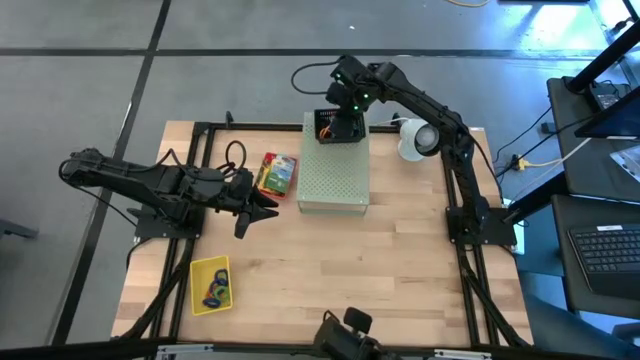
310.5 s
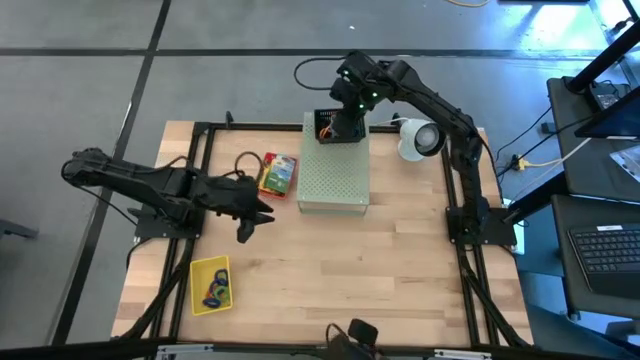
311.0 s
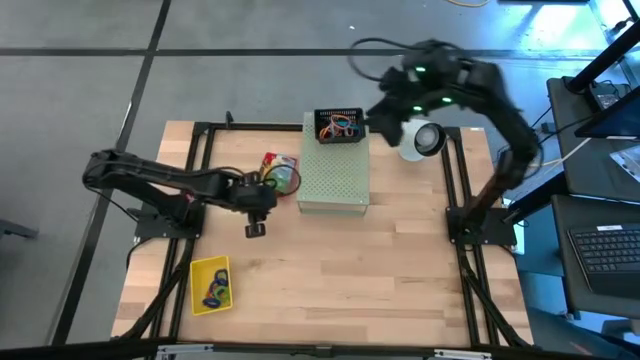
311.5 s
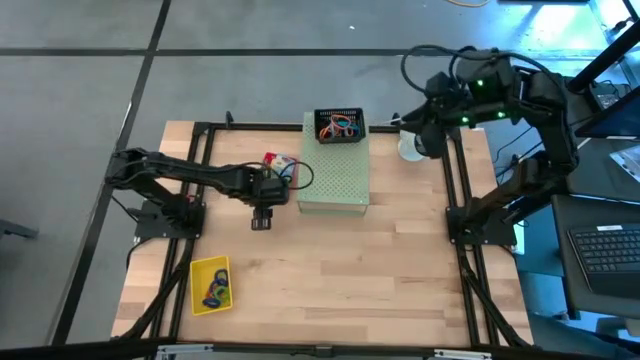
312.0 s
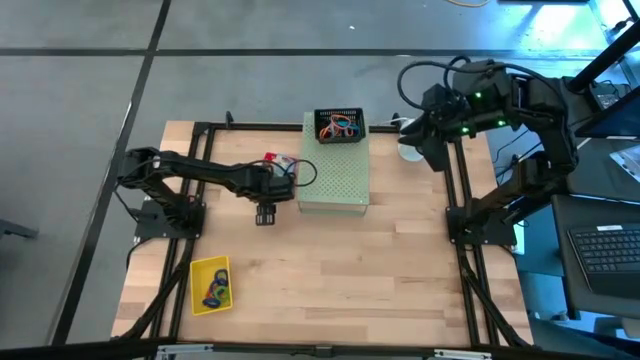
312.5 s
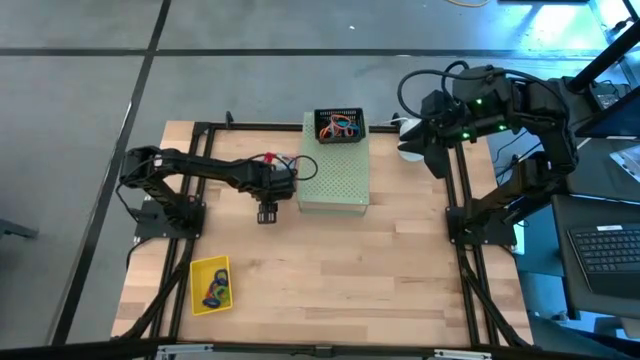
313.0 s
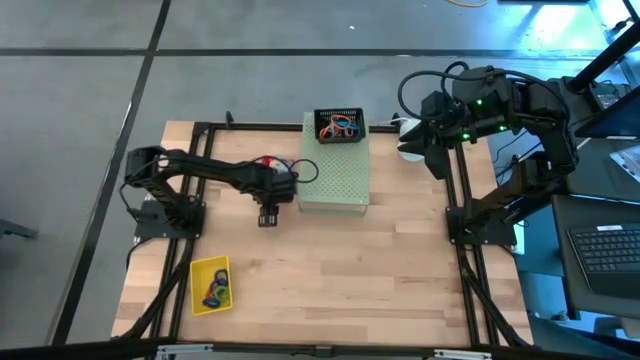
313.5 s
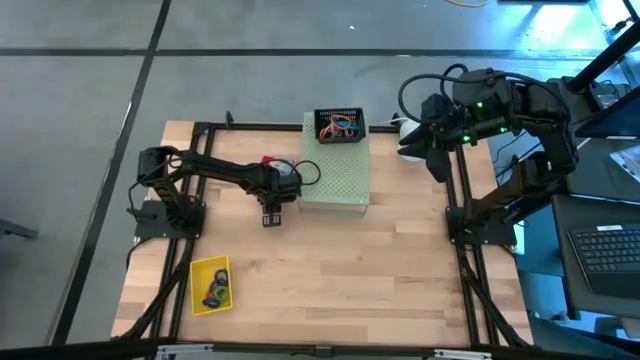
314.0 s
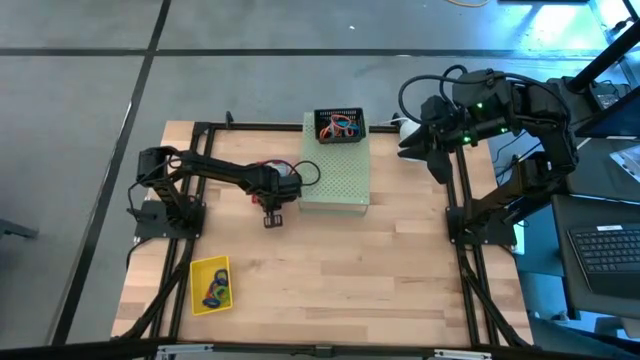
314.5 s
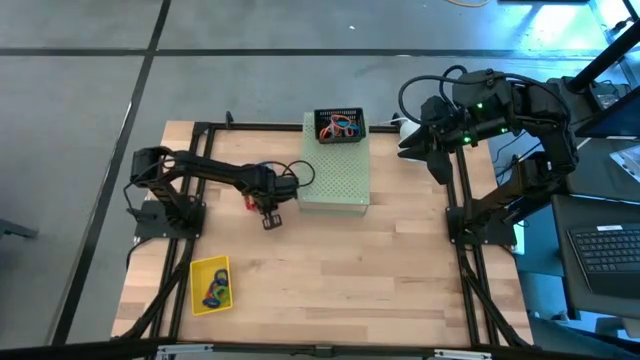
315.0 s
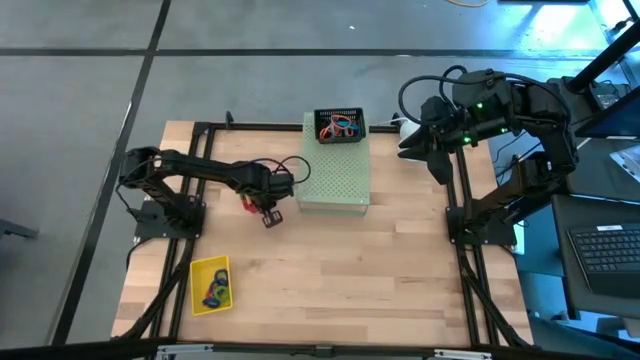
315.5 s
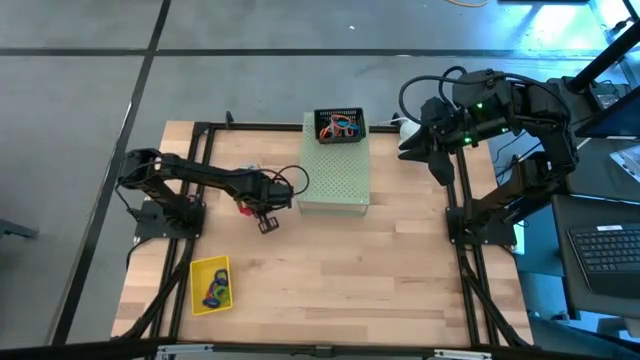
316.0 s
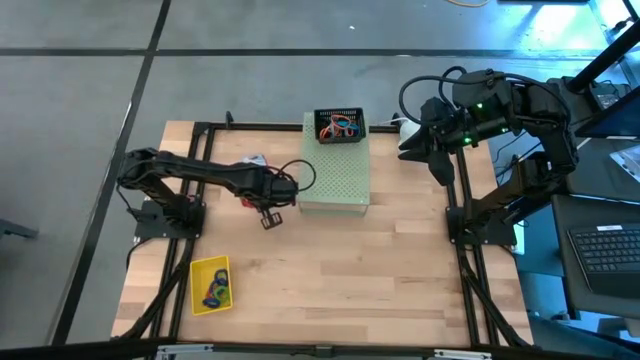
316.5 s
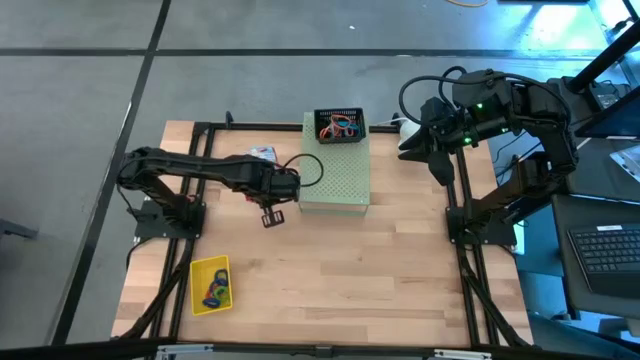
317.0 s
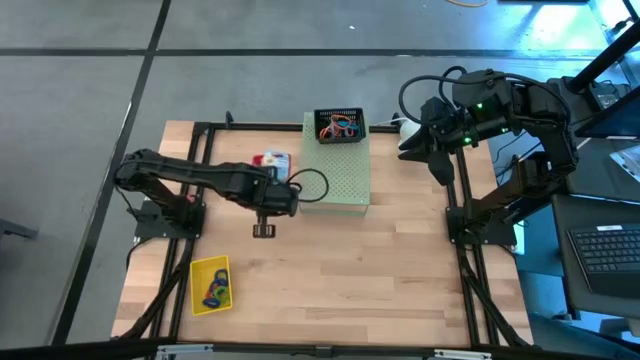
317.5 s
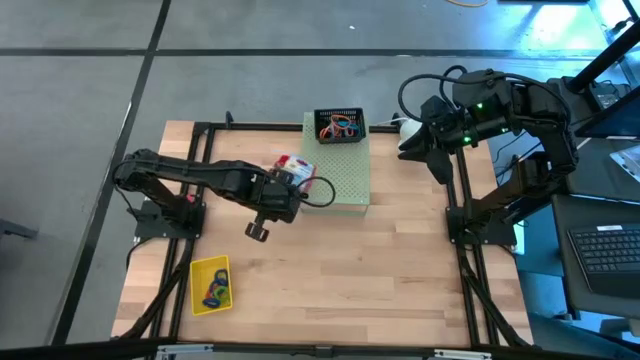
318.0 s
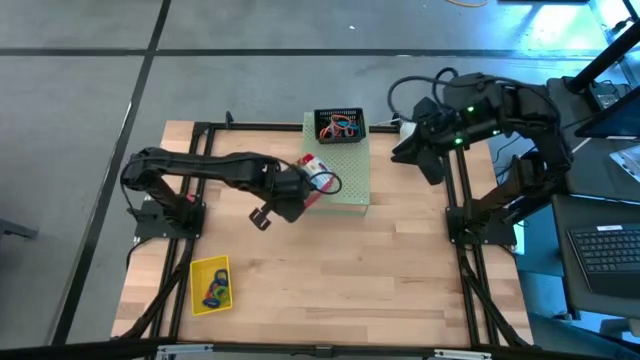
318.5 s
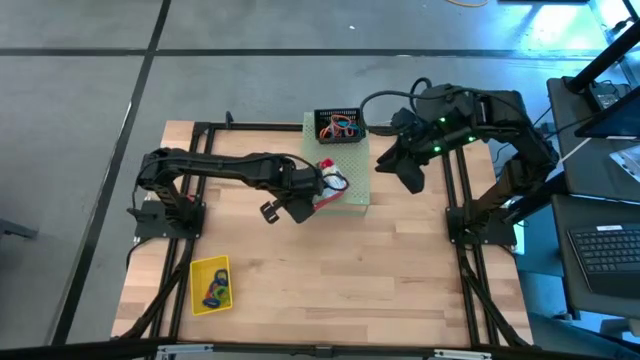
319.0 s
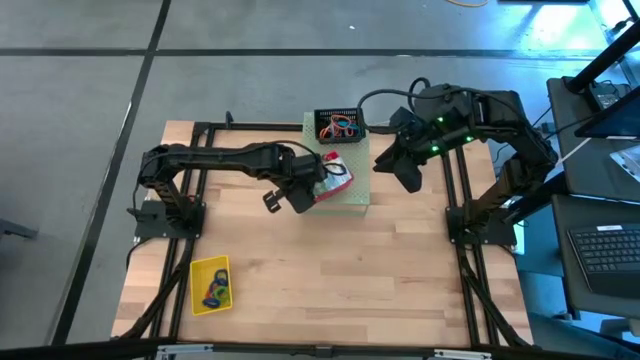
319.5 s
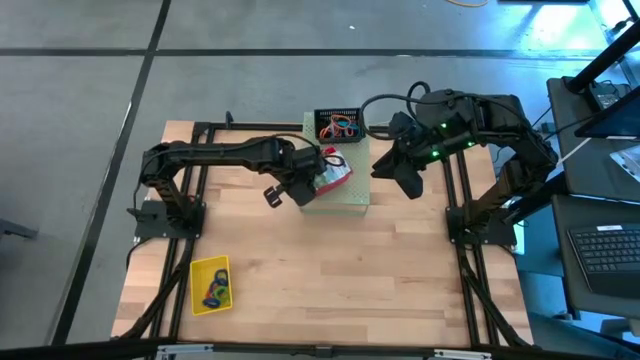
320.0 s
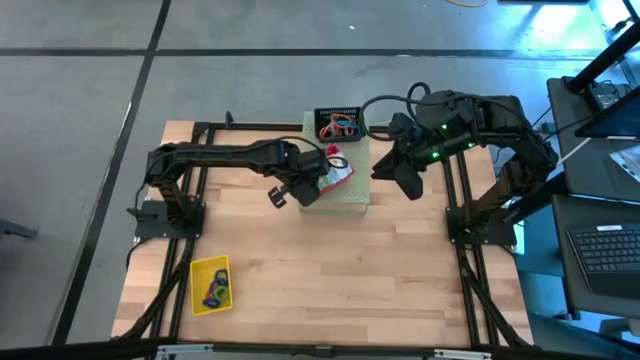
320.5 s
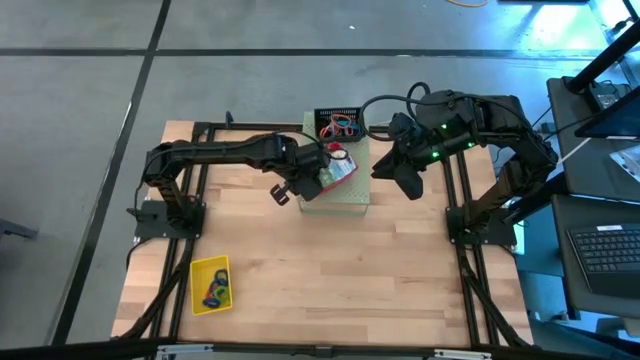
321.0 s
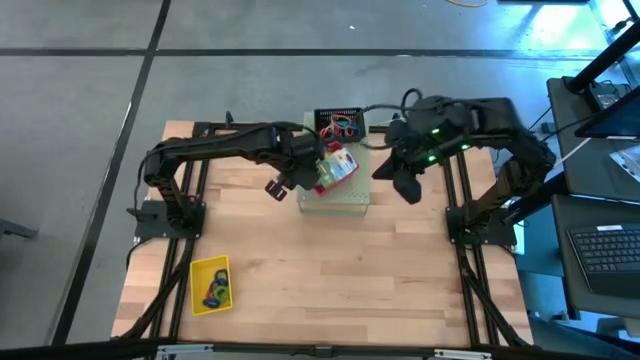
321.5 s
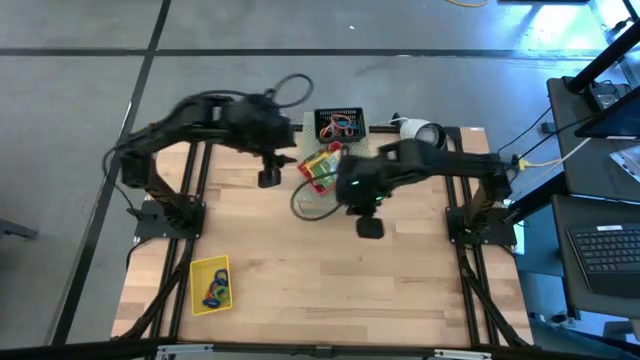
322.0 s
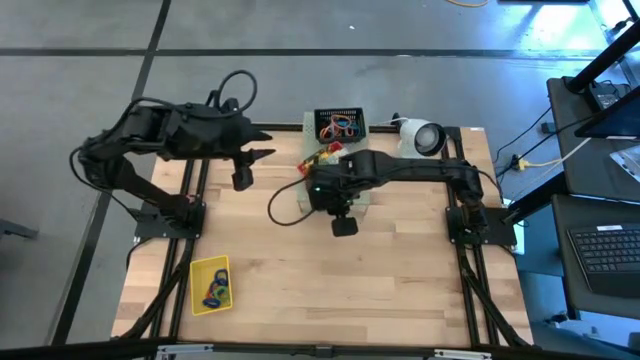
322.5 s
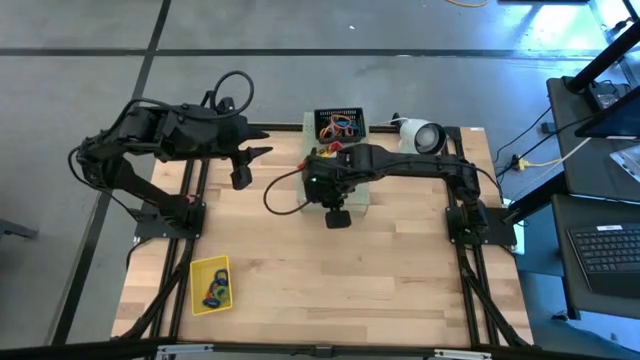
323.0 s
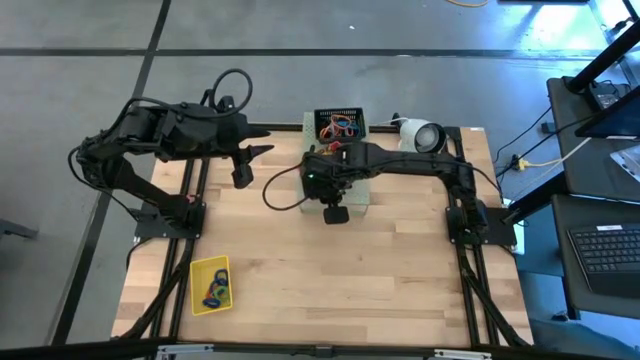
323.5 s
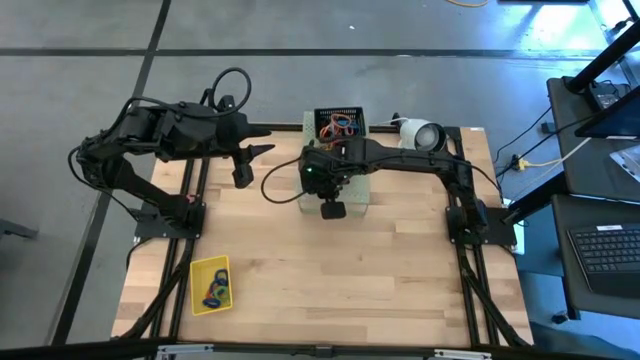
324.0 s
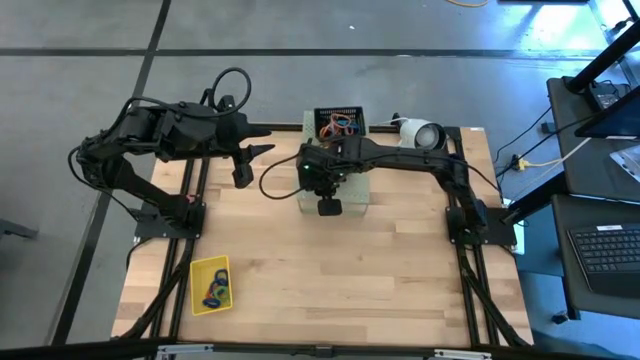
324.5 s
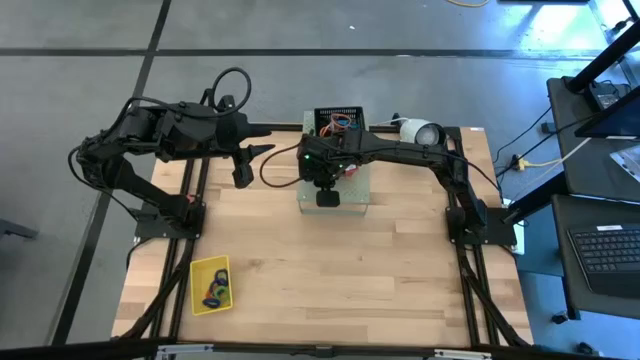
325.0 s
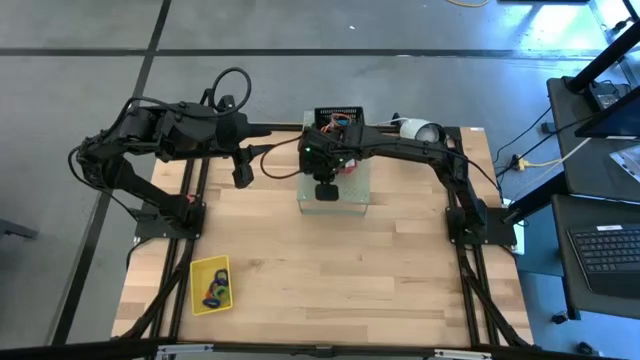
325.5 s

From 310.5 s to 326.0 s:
Task: Pick & Place Office Desk Supplies
Put the orange bin on the shelf
